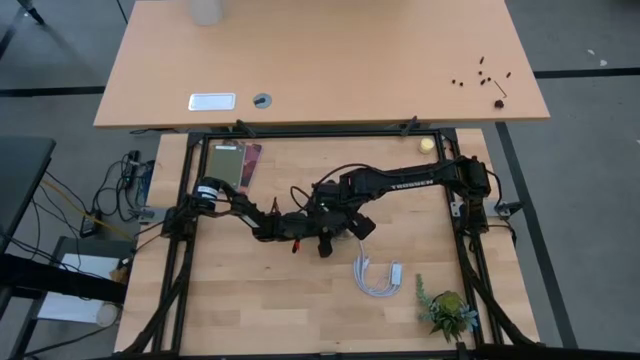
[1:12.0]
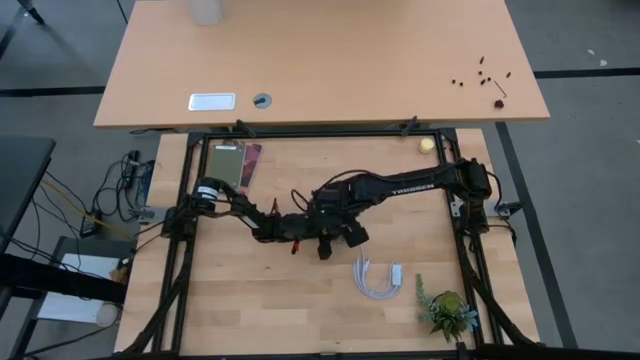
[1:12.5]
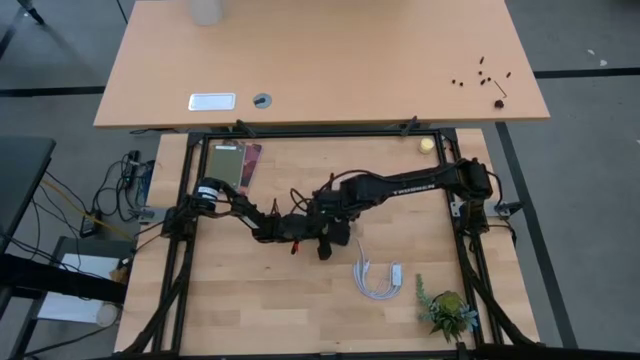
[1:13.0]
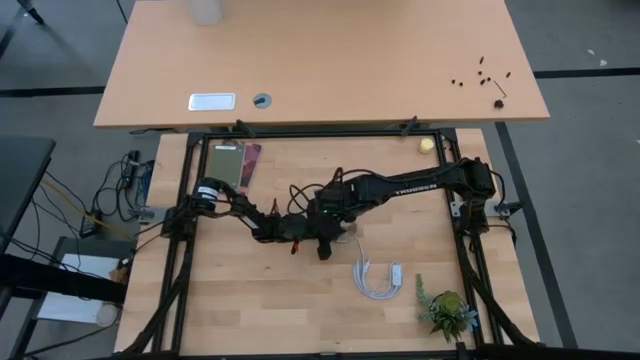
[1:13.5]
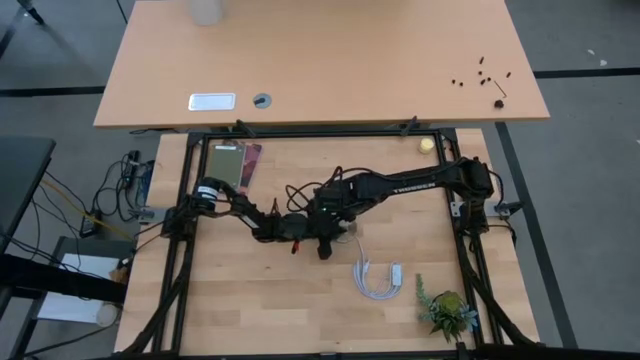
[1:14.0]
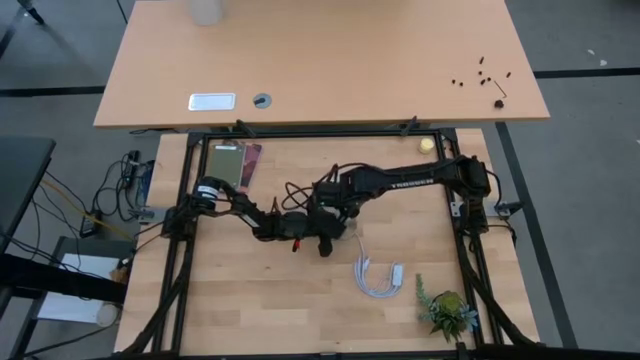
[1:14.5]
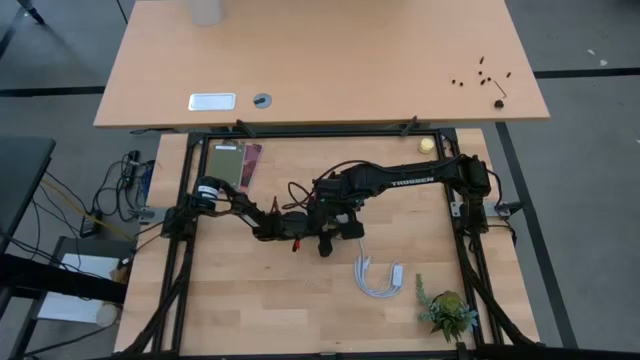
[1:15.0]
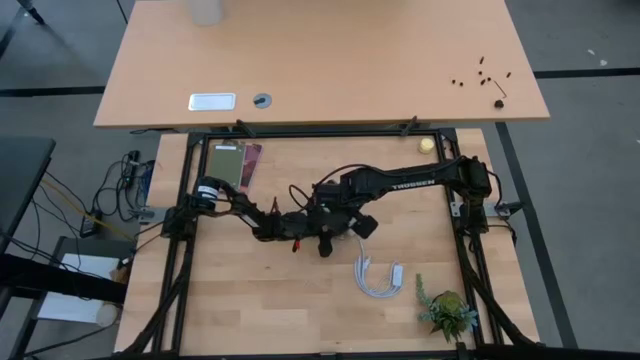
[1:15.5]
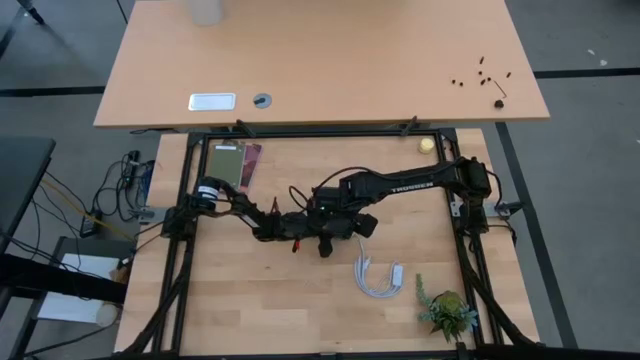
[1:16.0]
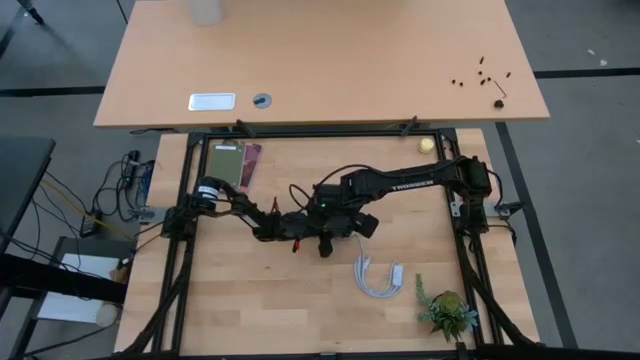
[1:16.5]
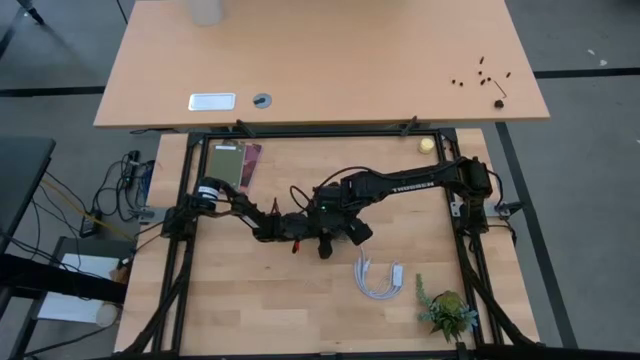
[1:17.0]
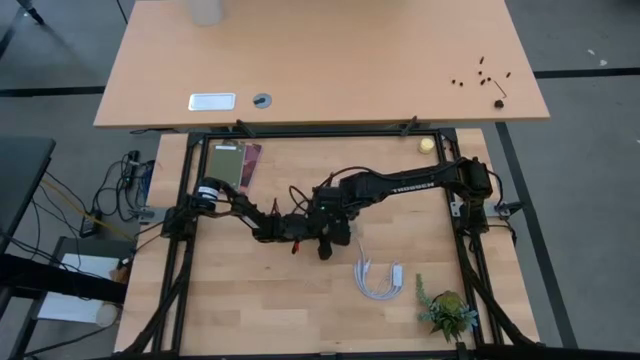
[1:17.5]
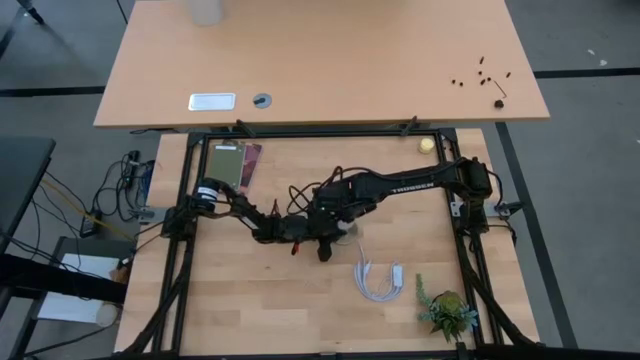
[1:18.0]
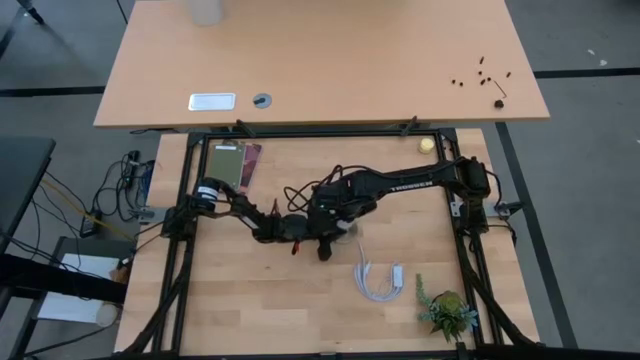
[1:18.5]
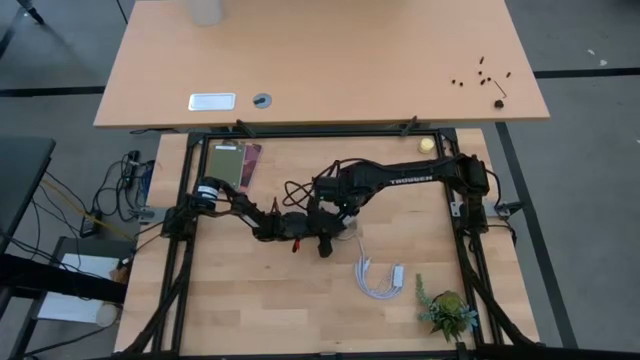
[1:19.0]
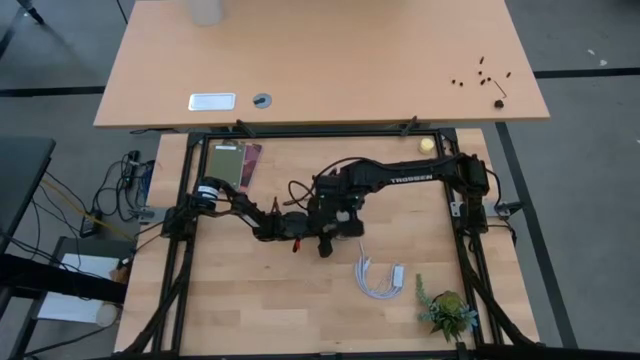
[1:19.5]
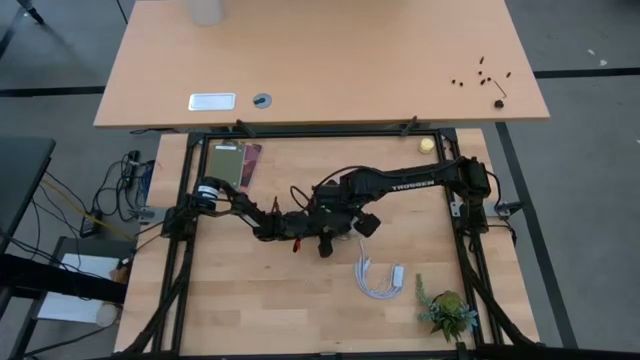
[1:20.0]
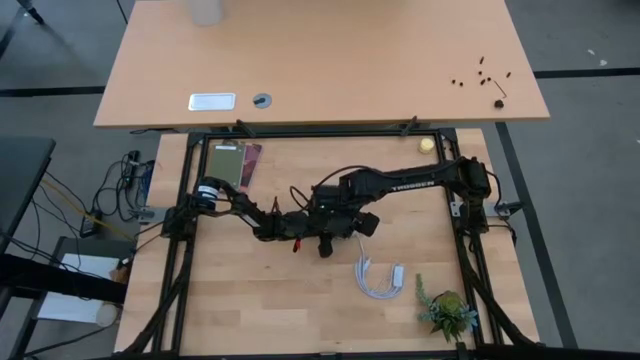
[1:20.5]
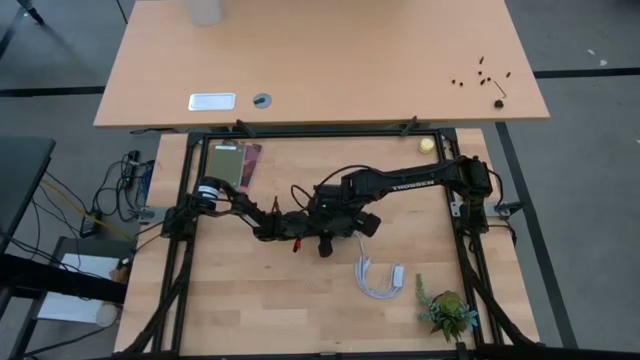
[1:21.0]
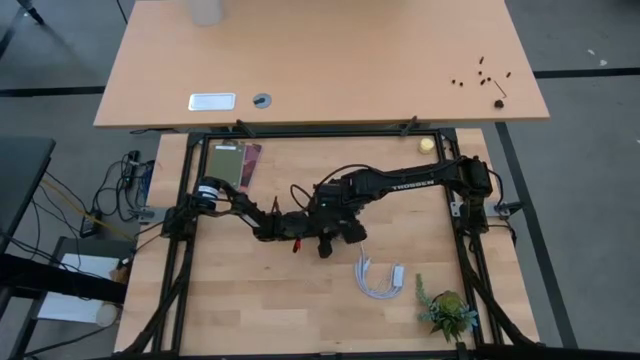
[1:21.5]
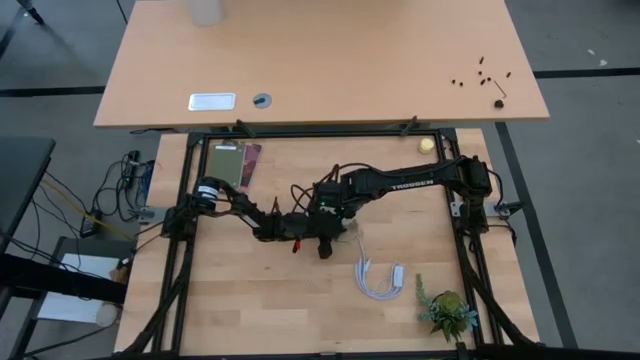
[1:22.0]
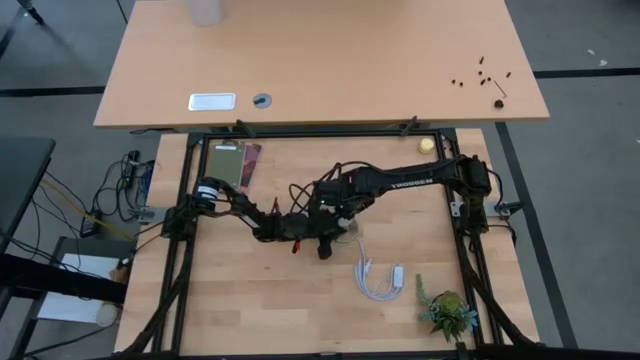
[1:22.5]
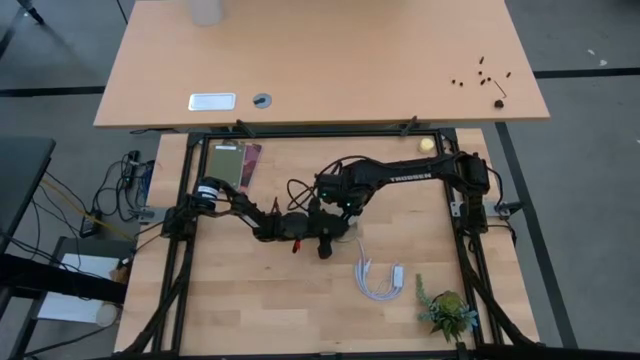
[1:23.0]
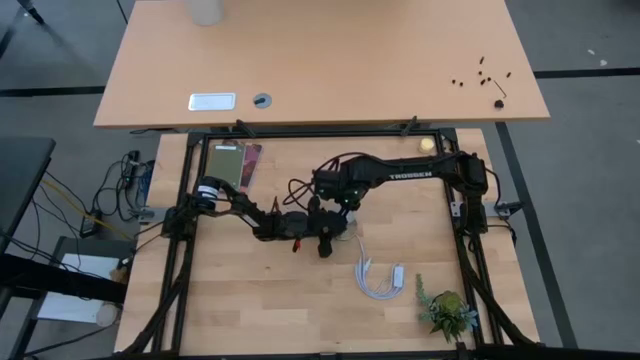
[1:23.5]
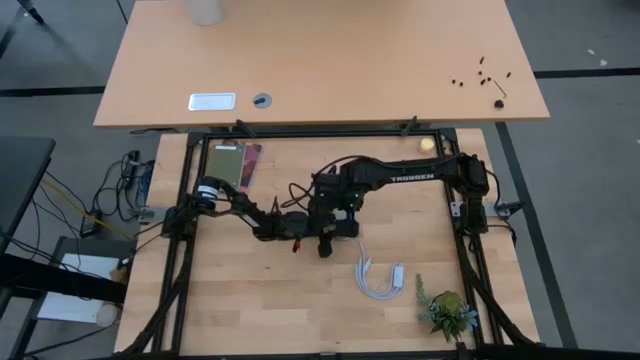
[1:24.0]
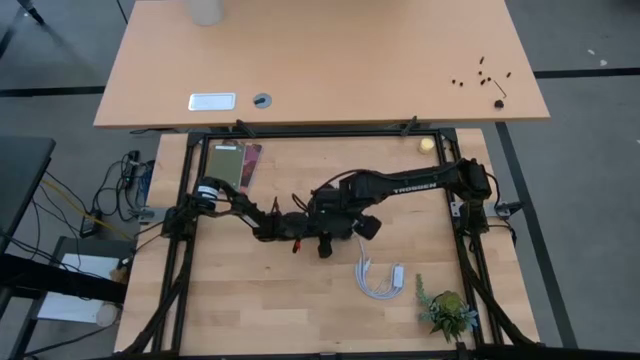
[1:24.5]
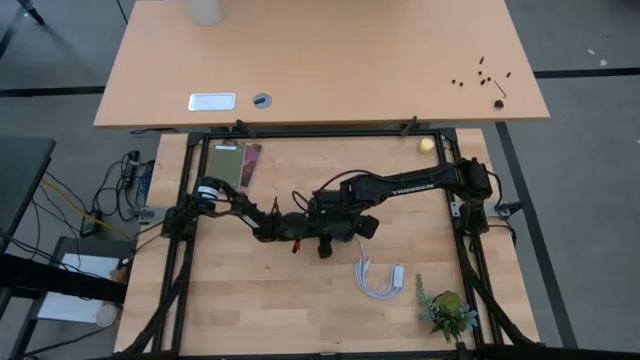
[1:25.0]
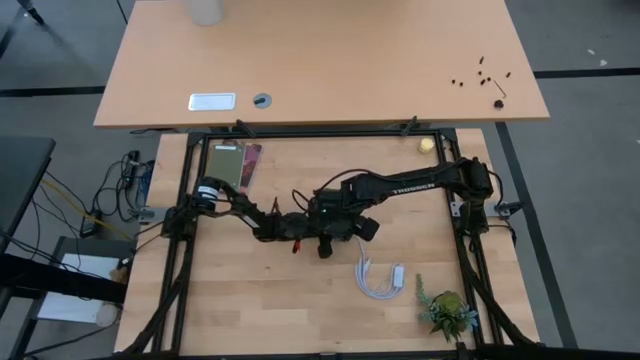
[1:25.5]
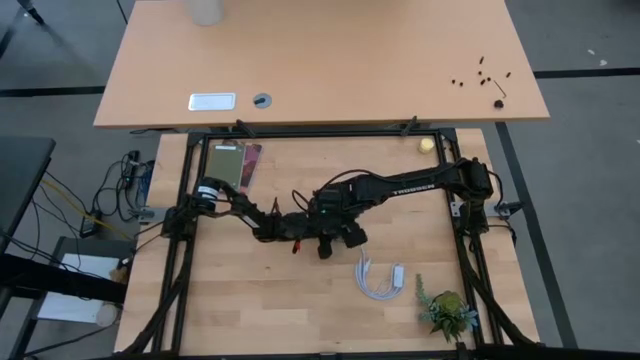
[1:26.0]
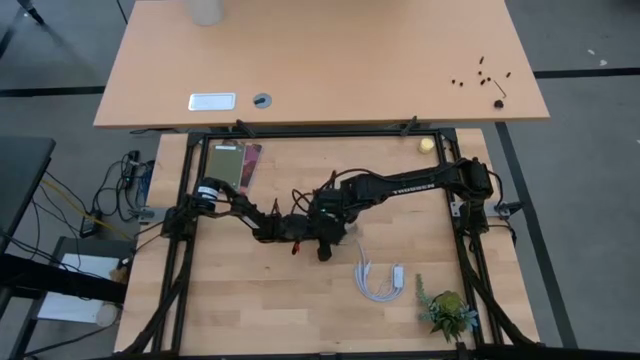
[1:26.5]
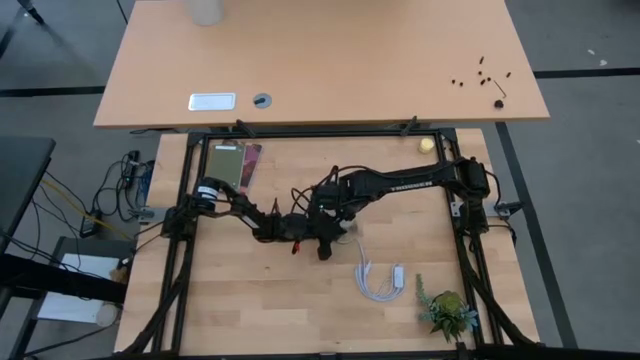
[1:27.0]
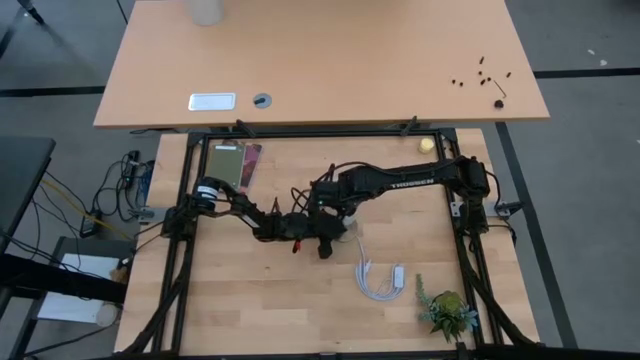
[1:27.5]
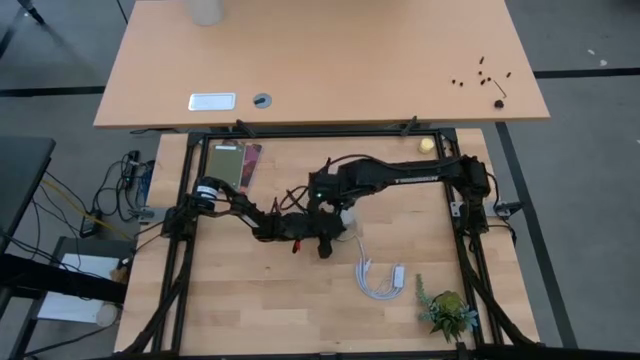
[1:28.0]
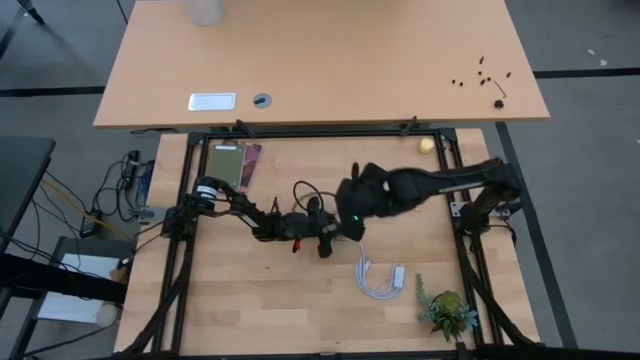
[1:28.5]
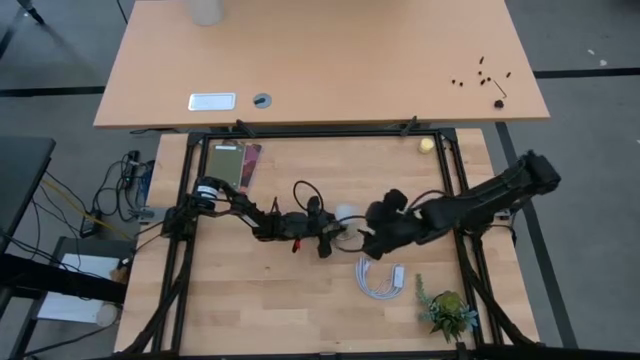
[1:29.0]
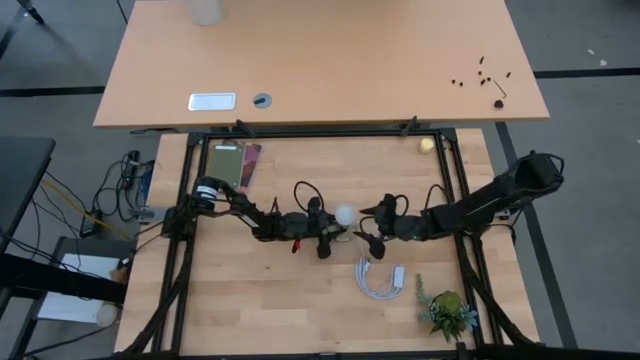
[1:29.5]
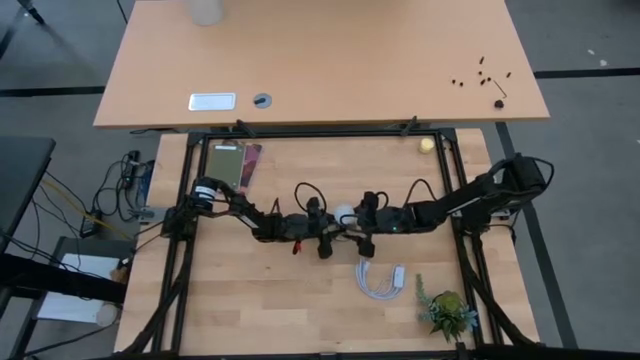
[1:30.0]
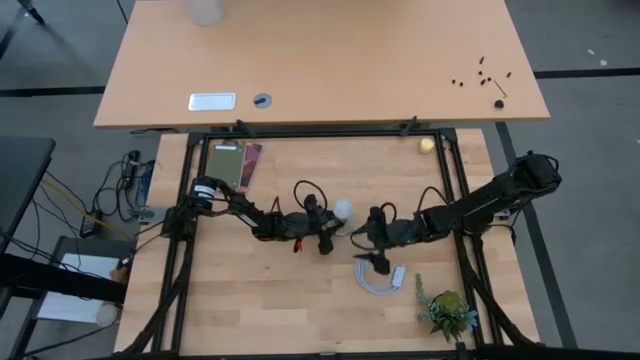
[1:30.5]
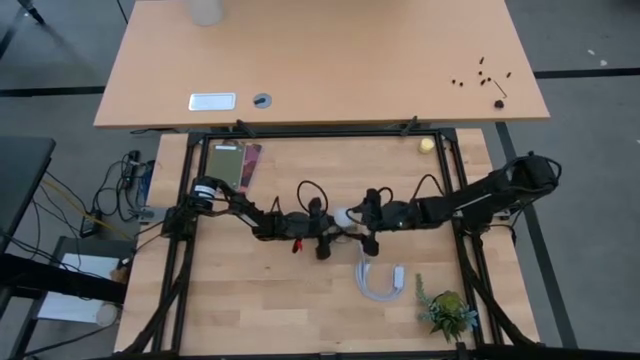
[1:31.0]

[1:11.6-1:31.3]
Task: Screw lightbulb
Insert the white lightbulb into the desk lamp

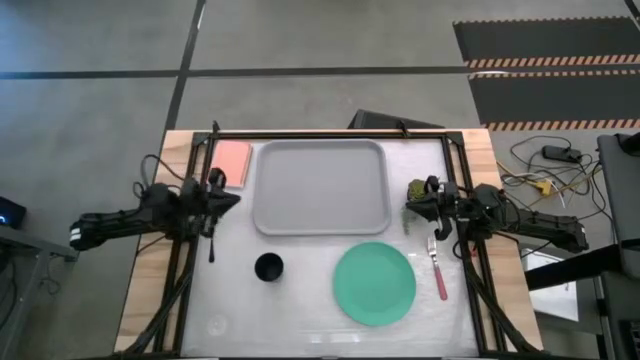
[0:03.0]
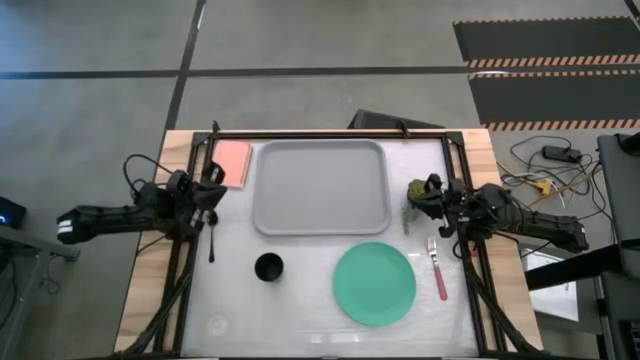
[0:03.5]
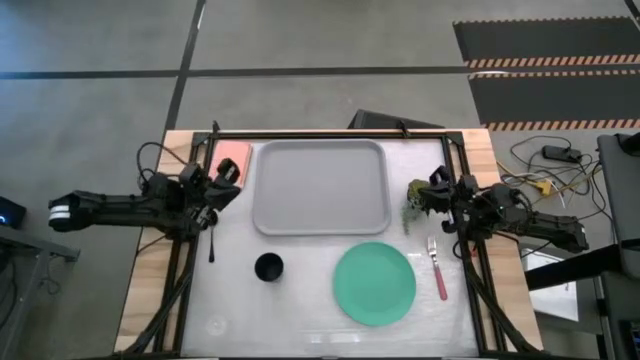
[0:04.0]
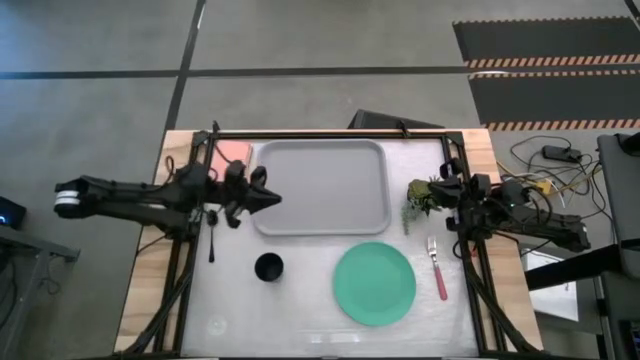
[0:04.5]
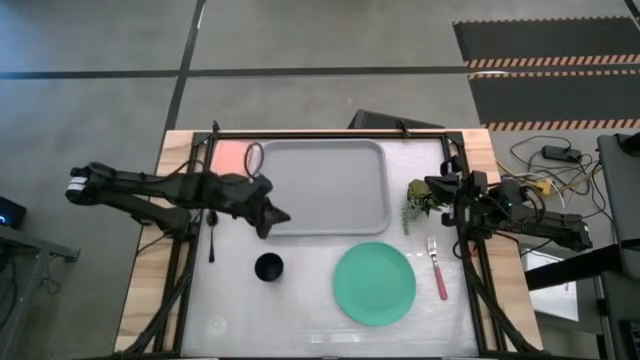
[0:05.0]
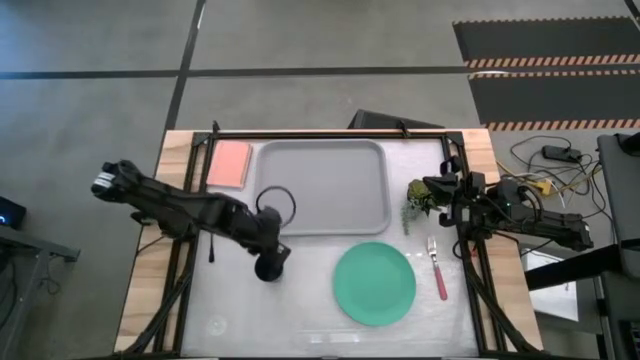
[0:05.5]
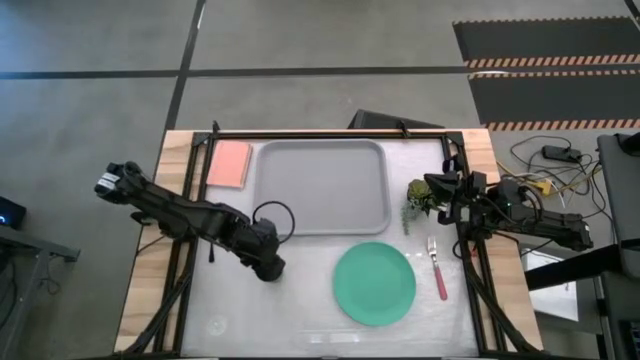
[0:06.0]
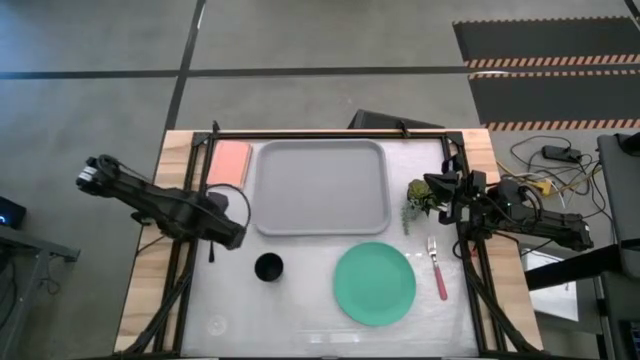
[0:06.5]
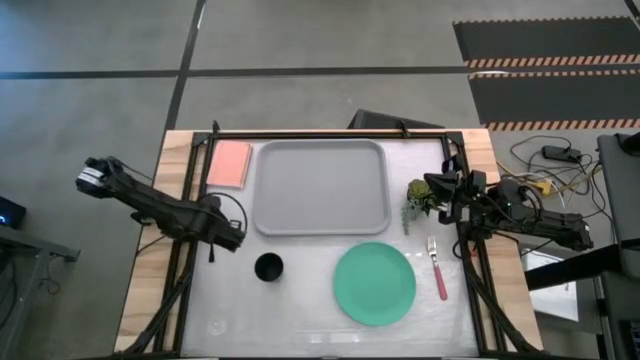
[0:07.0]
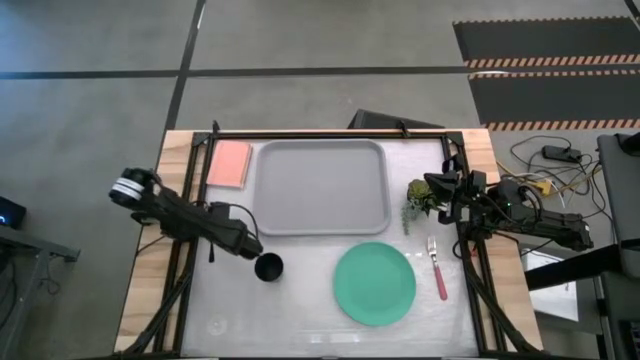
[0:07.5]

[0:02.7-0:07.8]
Task: Pick and place plate/cup/fork/spoon on tray
Put the black cup on the gray serving tray
